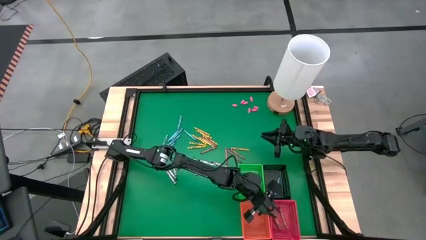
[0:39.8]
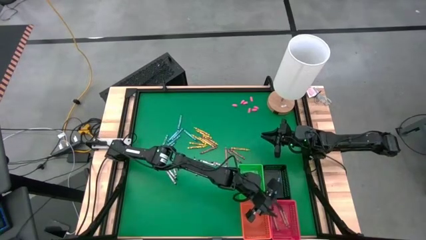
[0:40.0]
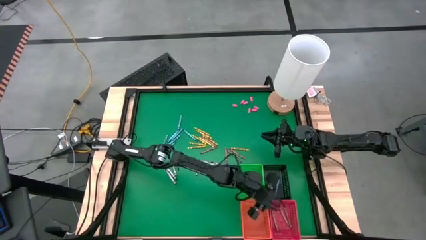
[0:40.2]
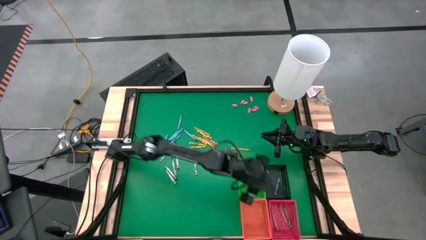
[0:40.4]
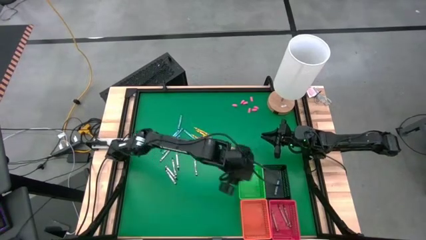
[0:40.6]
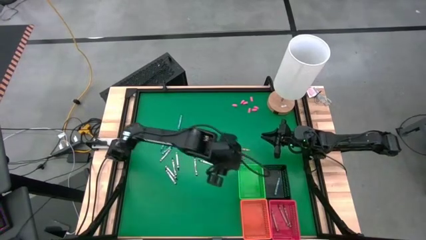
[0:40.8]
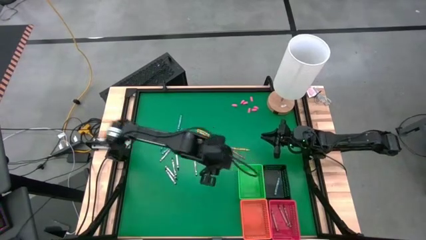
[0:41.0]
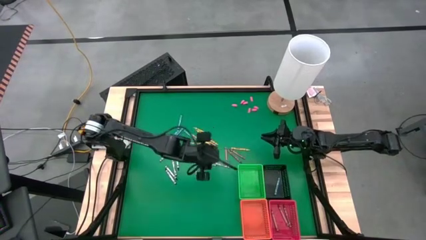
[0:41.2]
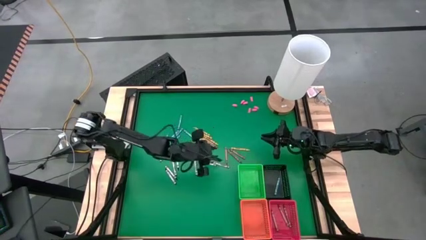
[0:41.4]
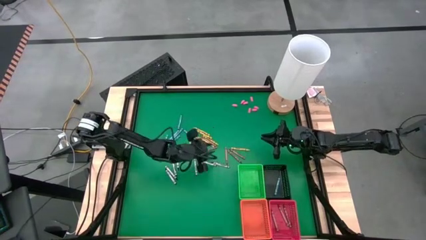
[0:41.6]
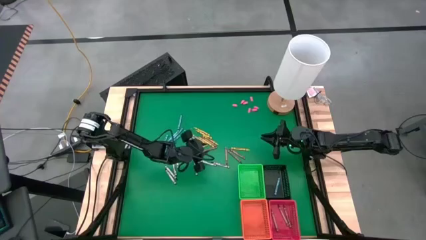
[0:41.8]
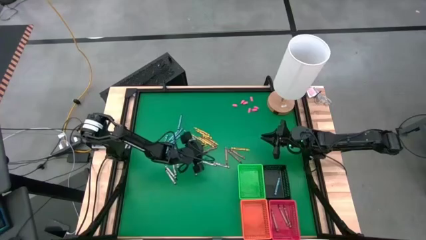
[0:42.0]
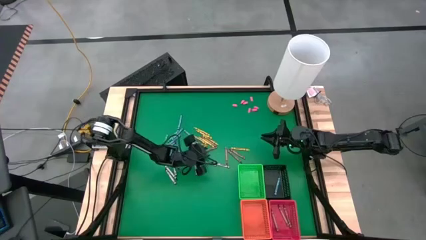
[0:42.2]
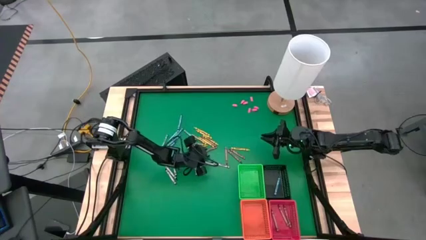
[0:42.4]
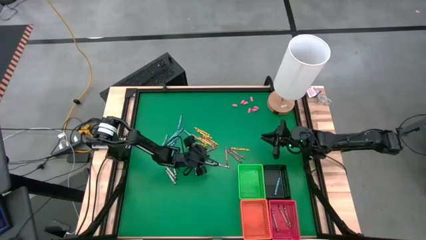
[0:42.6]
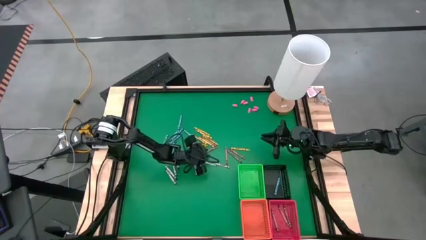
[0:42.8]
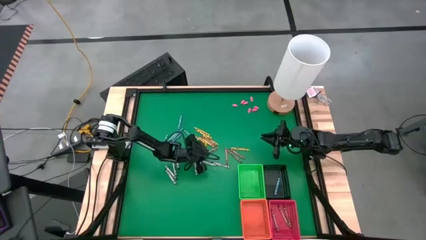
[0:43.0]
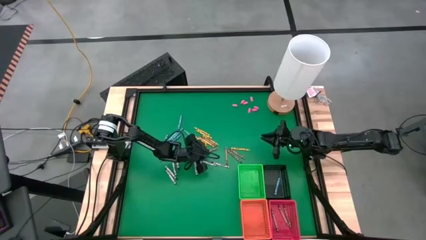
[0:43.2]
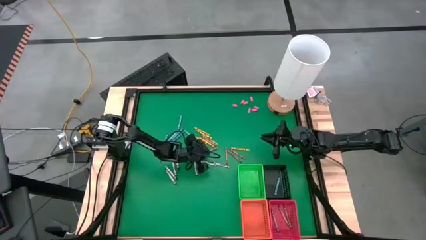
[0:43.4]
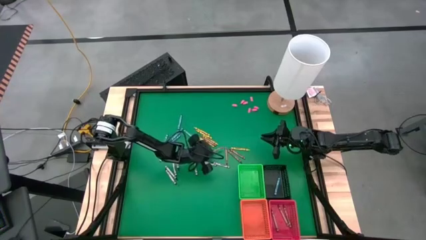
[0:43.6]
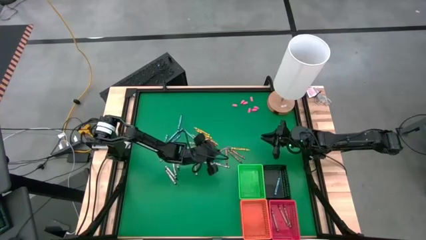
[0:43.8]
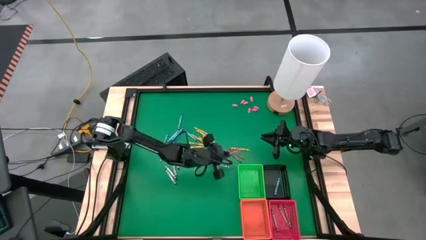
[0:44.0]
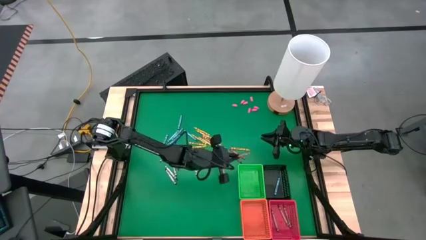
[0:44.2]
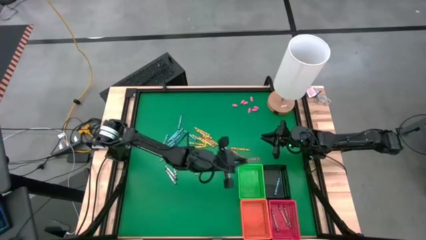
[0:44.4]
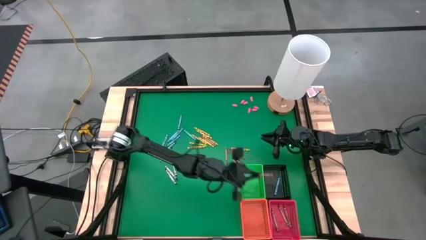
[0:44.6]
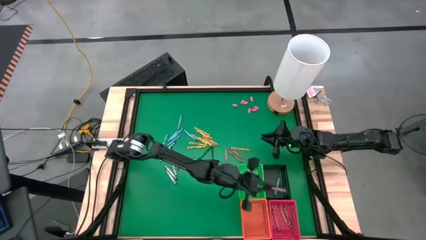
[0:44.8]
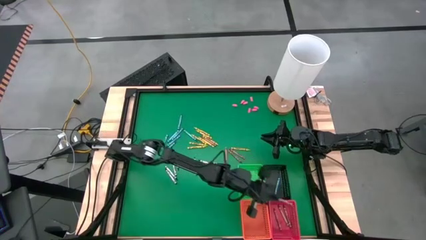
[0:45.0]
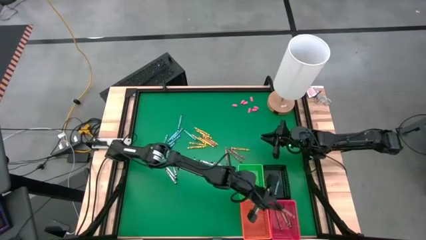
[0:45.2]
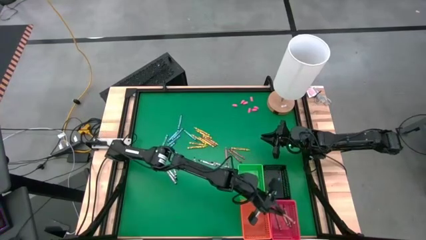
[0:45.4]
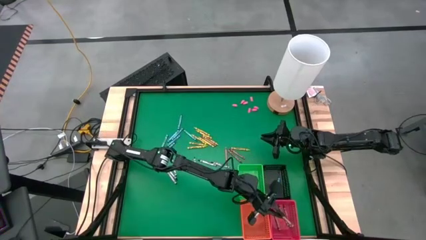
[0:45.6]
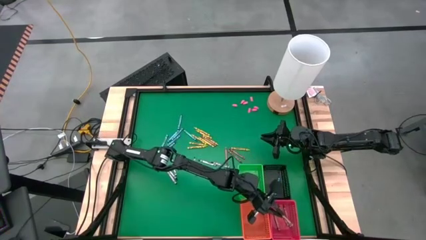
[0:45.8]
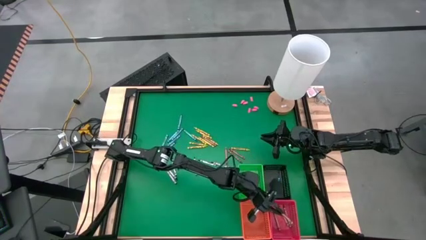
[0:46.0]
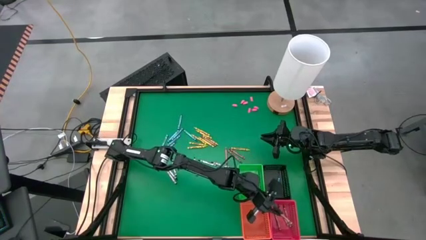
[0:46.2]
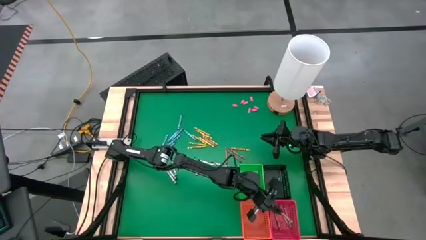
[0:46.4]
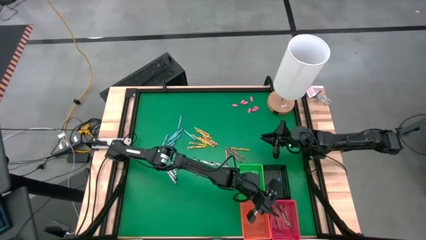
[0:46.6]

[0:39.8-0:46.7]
Task: Sort crayons
Put the brown crayon into the red bin

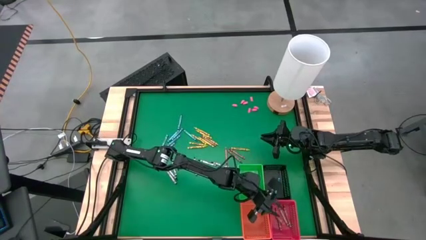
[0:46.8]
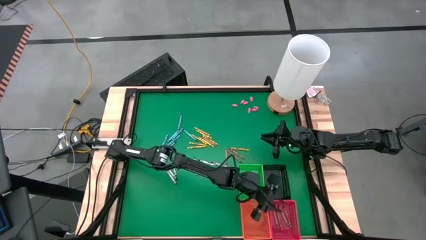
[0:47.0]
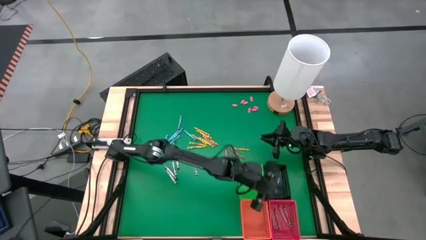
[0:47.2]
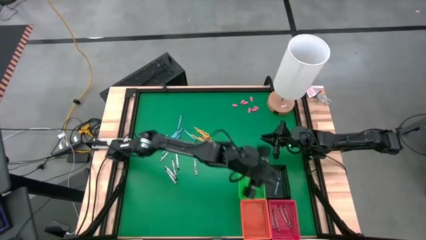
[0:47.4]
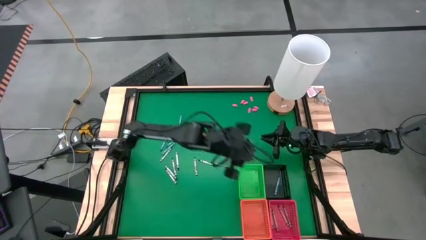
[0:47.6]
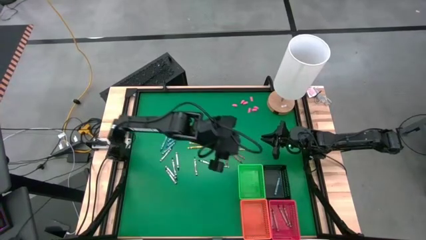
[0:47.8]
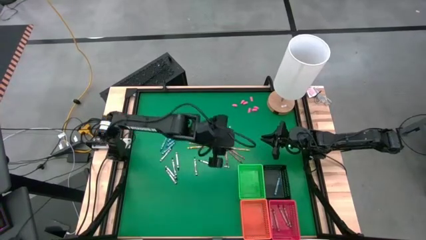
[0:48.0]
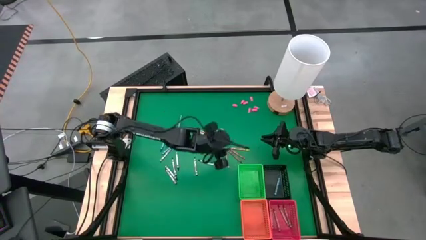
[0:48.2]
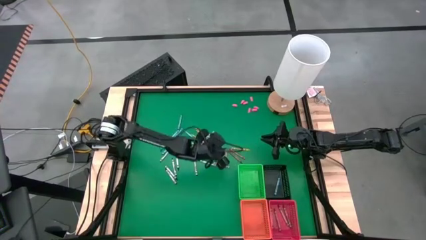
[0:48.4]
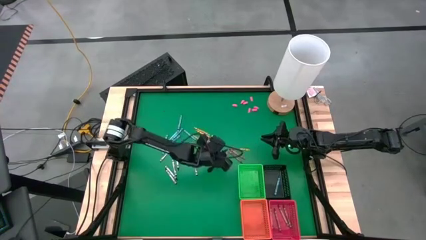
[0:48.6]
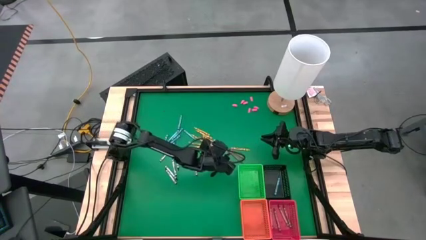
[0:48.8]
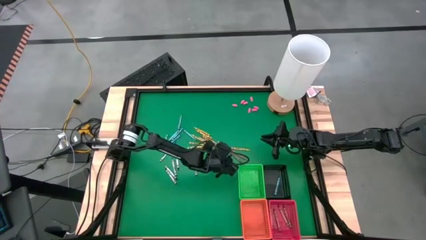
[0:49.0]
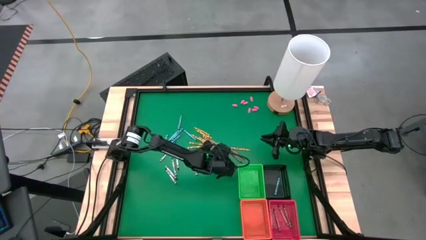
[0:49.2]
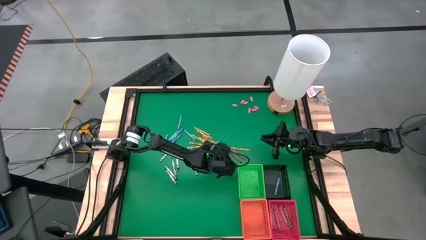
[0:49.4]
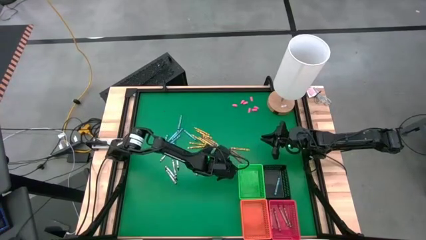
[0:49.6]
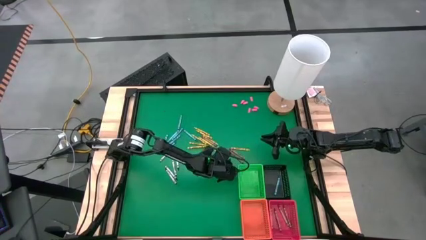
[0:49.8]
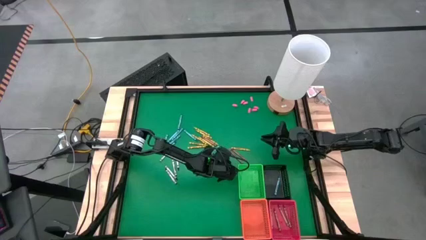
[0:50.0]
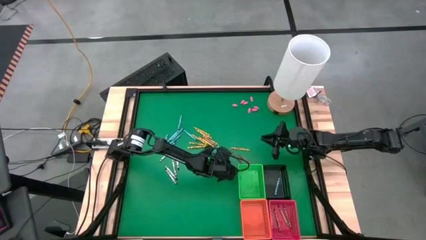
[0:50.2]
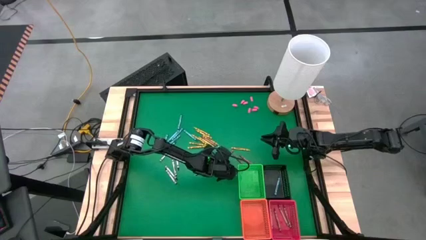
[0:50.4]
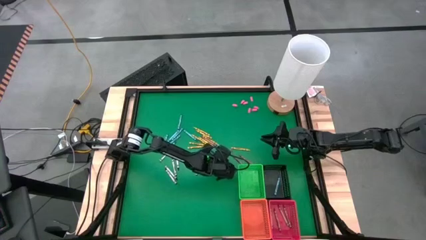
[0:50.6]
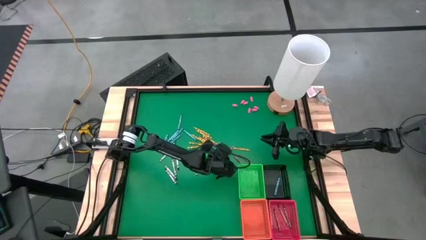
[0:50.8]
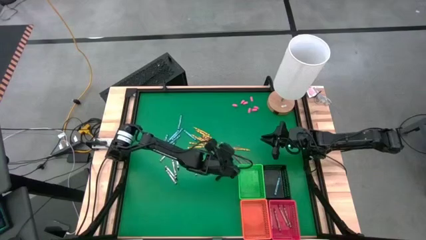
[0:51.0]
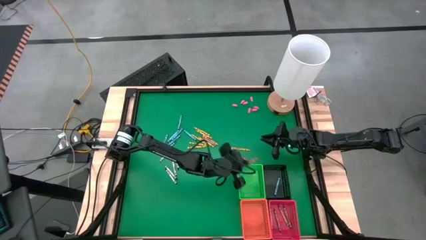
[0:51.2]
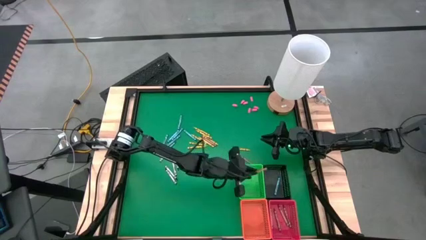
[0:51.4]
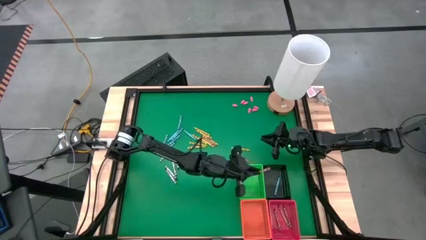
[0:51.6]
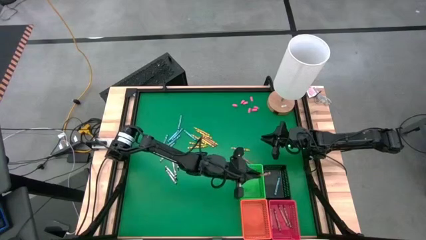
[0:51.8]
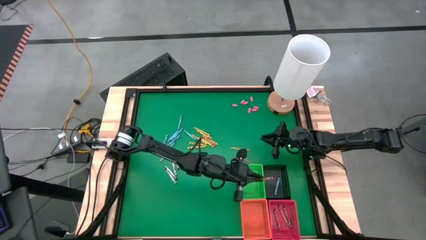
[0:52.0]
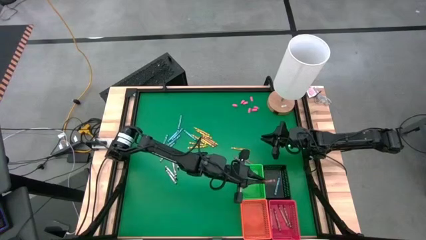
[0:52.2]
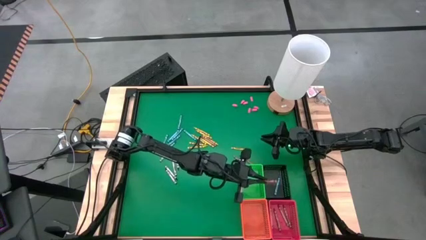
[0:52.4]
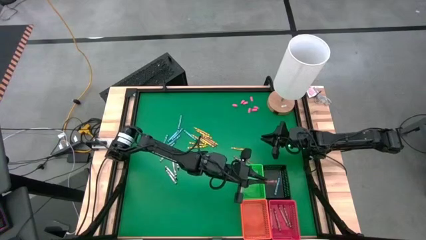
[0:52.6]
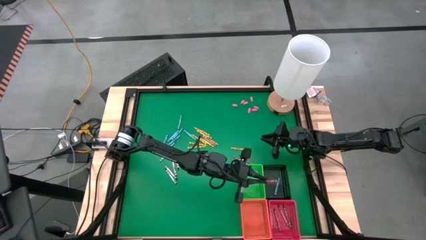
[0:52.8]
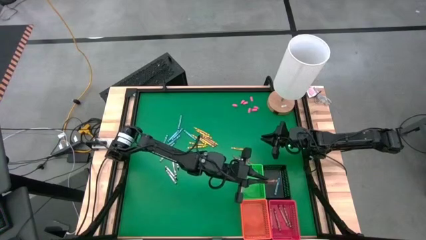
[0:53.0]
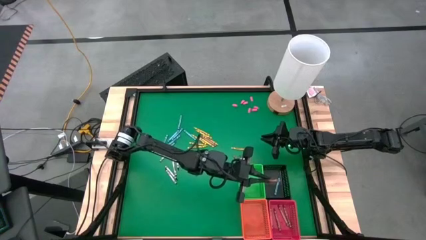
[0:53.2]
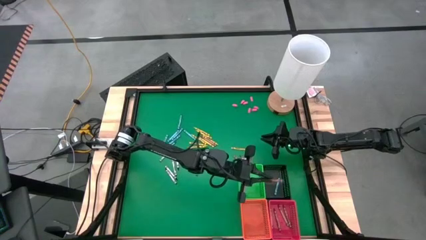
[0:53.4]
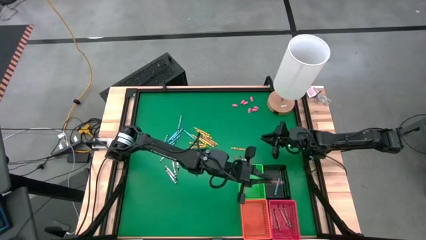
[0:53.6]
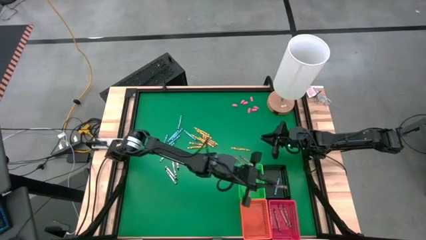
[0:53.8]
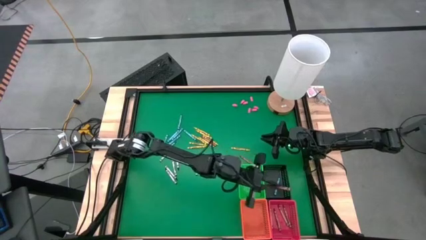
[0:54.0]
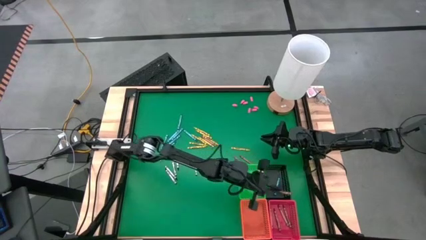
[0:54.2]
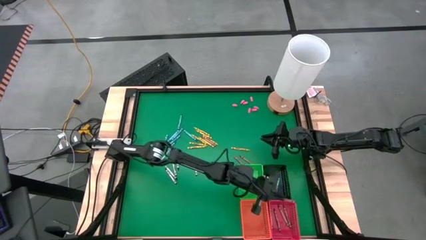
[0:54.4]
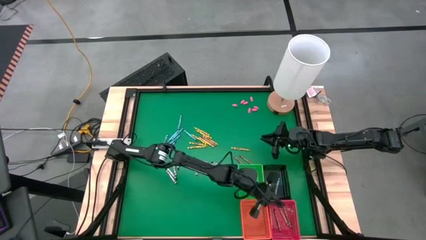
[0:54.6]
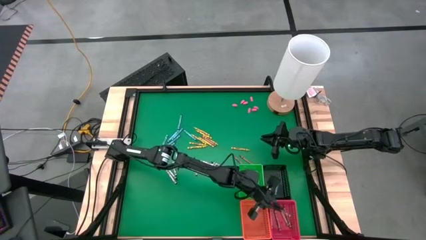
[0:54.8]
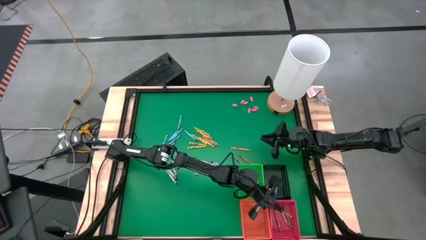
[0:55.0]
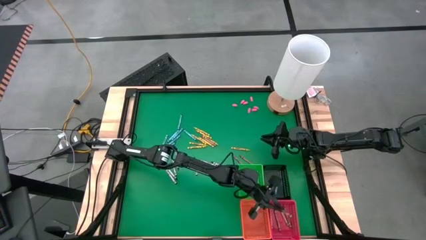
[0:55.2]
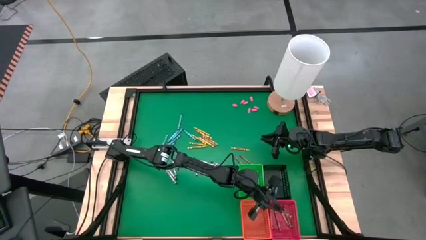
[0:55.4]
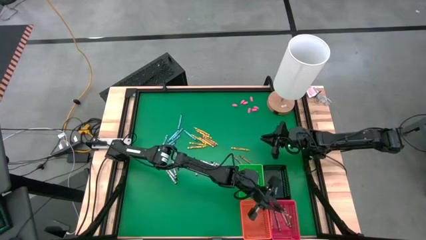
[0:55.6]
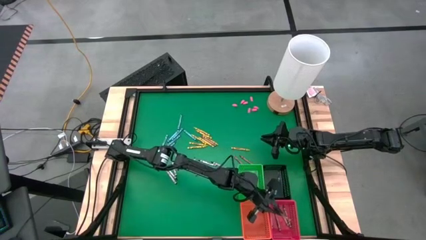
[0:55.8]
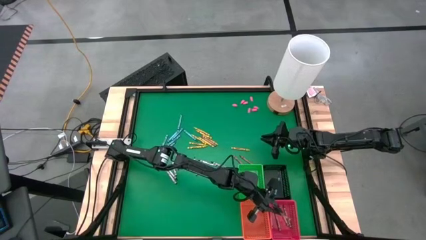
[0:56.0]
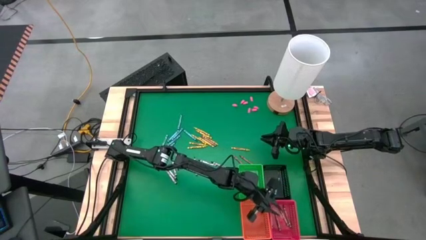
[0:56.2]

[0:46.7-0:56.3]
Put the brown crayon into the red bin
